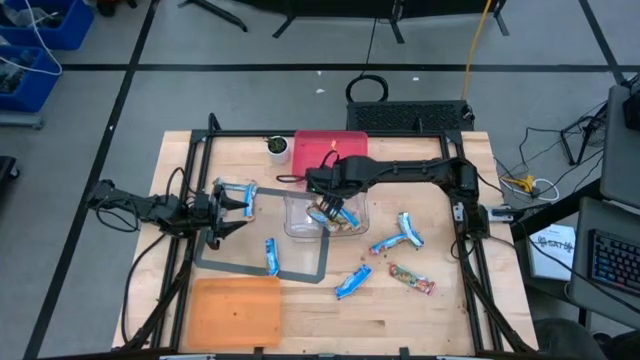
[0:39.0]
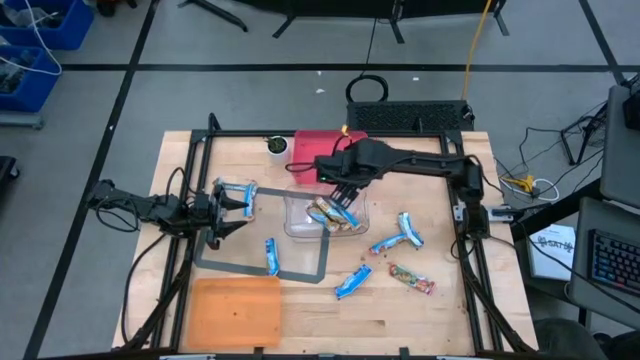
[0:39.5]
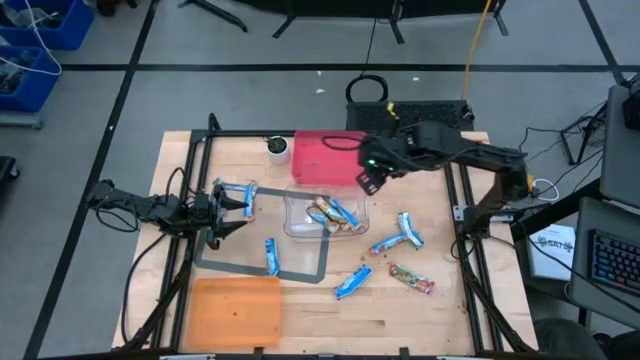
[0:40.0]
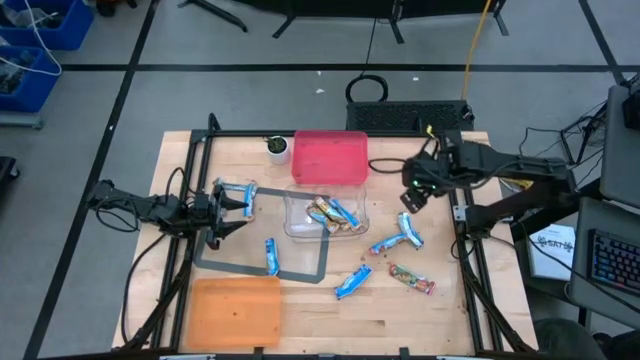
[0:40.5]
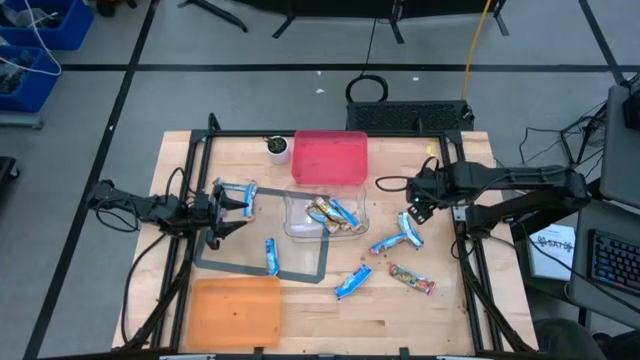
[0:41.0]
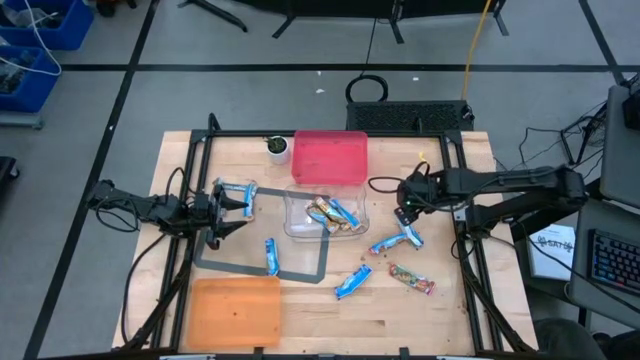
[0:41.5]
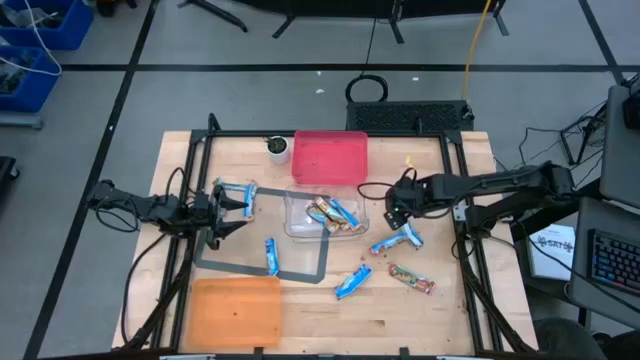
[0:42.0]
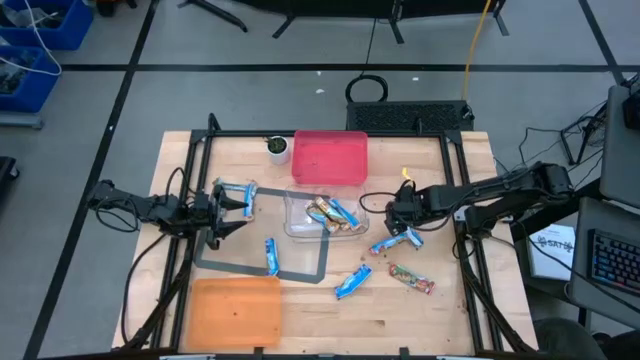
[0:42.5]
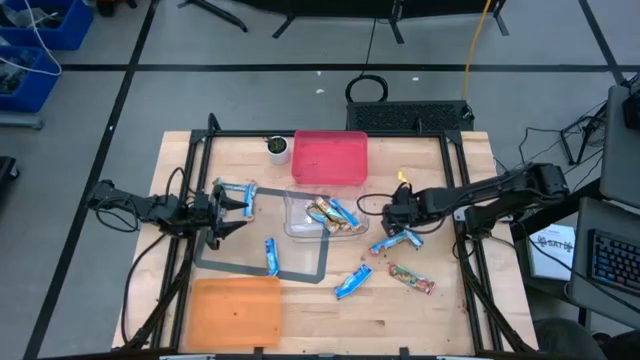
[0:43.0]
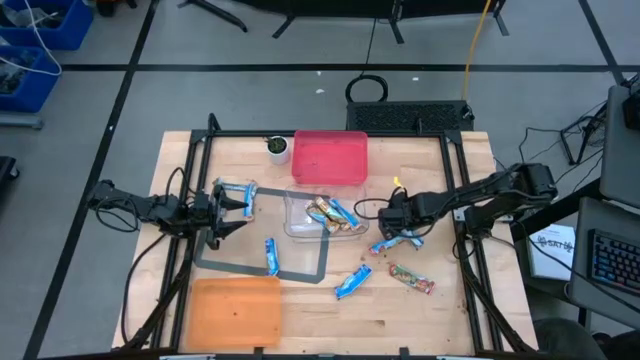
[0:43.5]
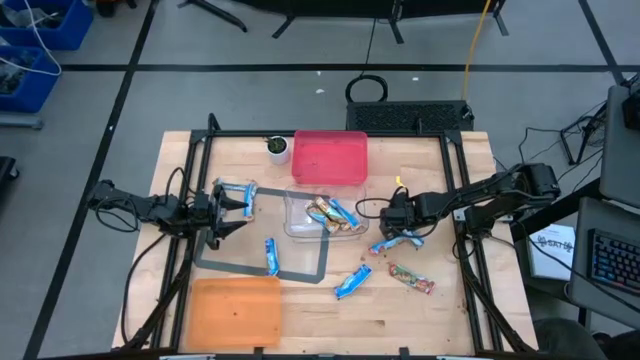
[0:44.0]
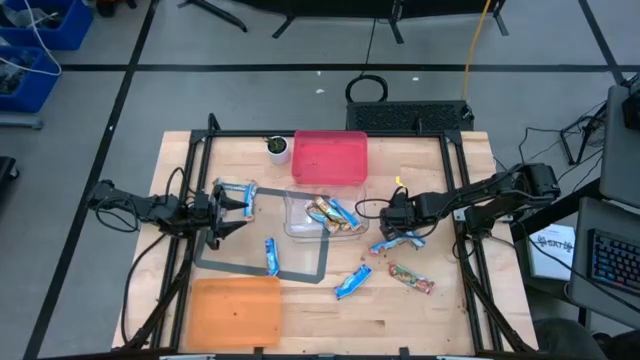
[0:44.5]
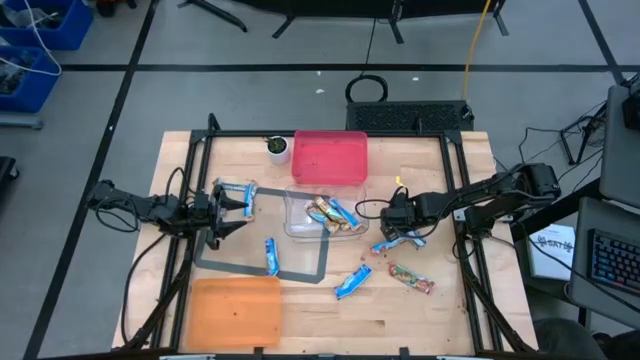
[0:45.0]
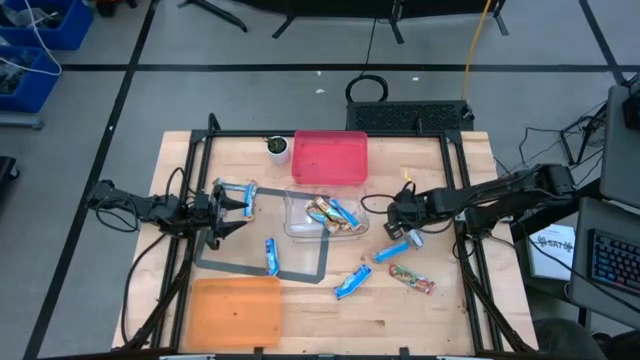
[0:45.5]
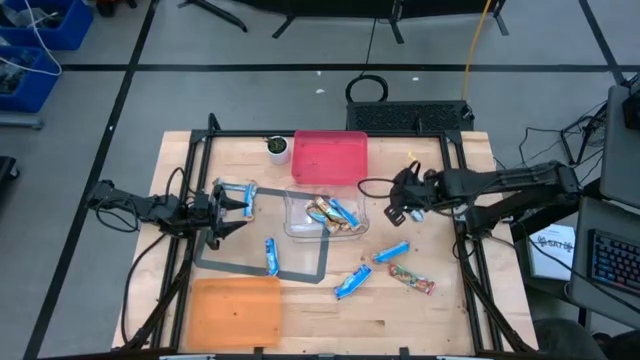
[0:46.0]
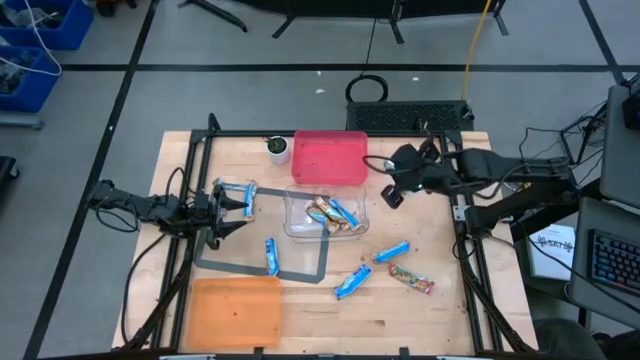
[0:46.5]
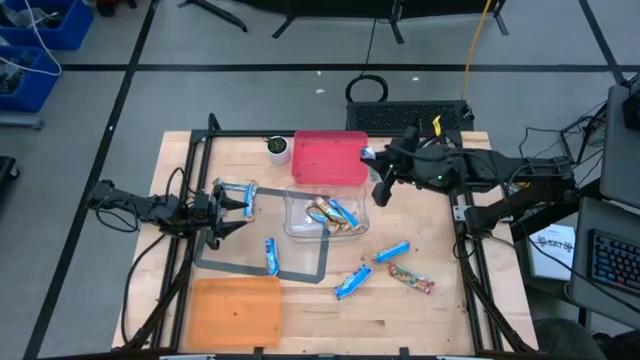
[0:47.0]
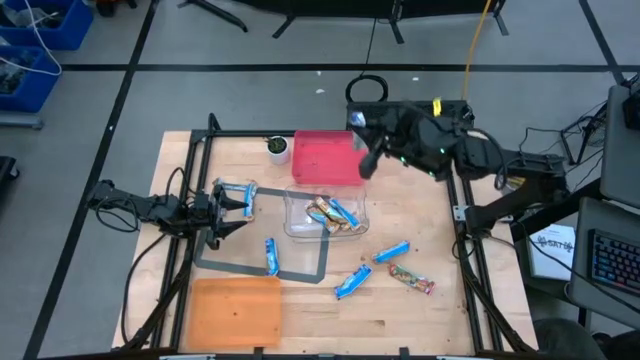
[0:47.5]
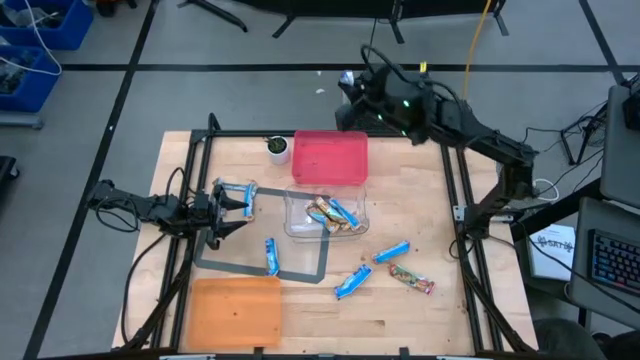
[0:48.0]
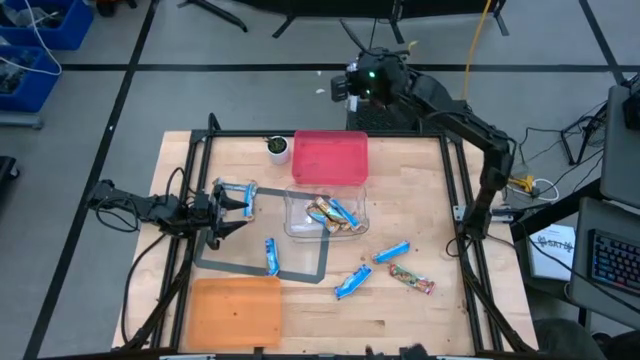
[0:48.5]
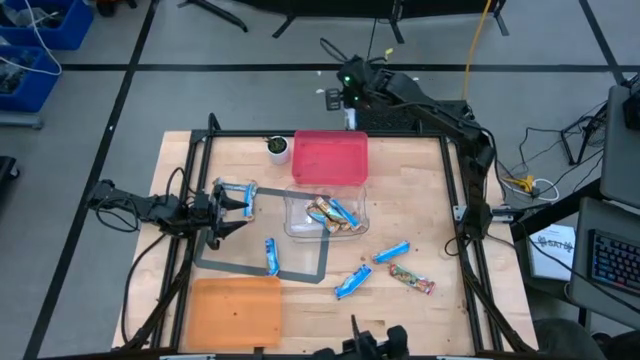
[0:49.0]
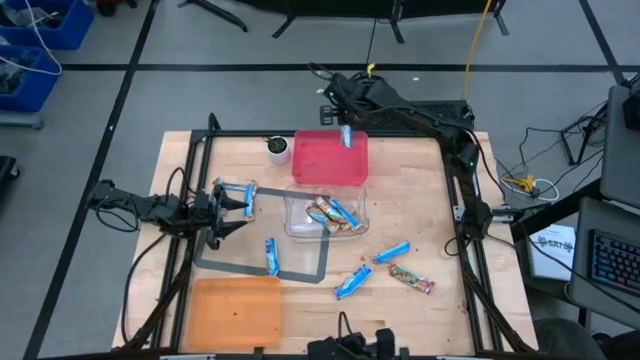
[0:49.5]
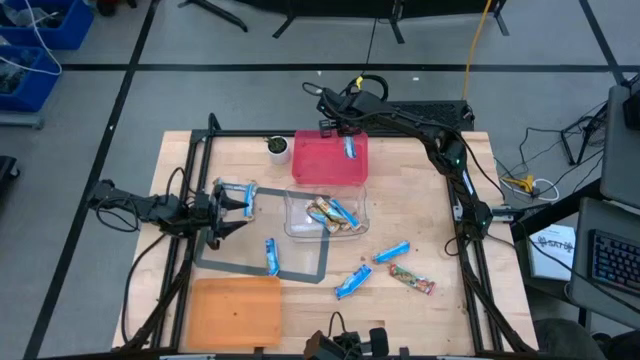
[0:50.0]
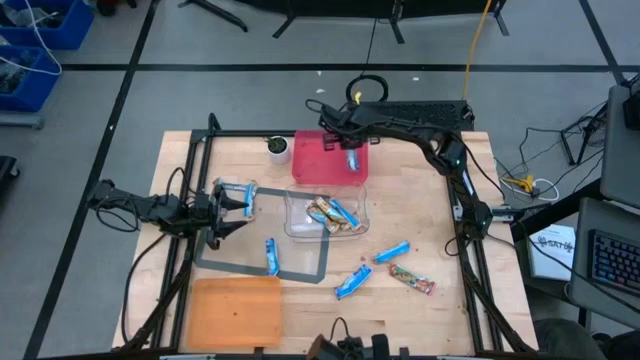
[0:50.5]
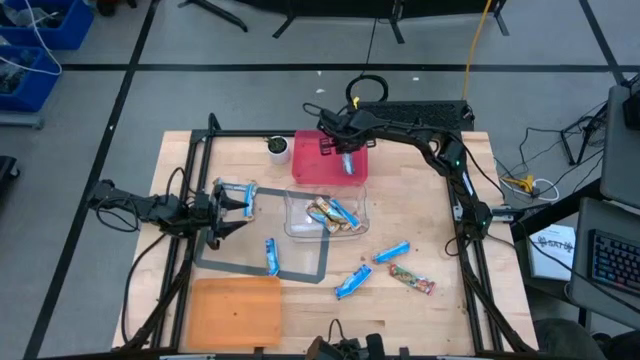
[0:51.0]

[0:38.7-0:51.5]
Task: Pick and place Granola Bars by type
Put the top right blue granola bar into the red bin

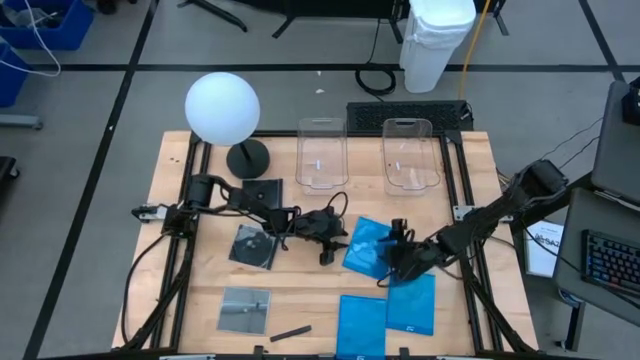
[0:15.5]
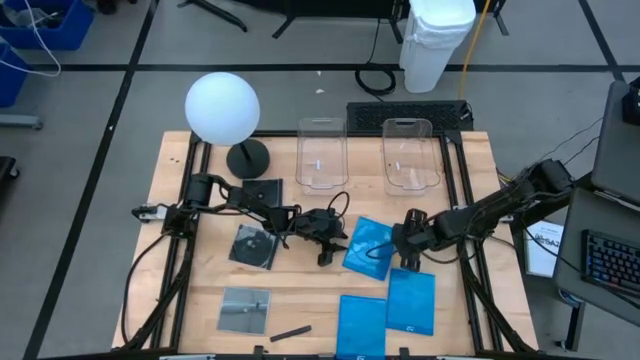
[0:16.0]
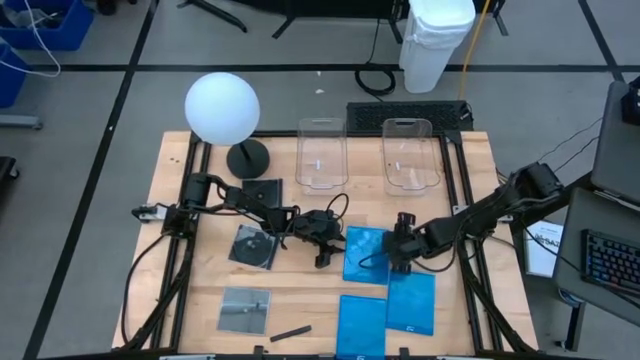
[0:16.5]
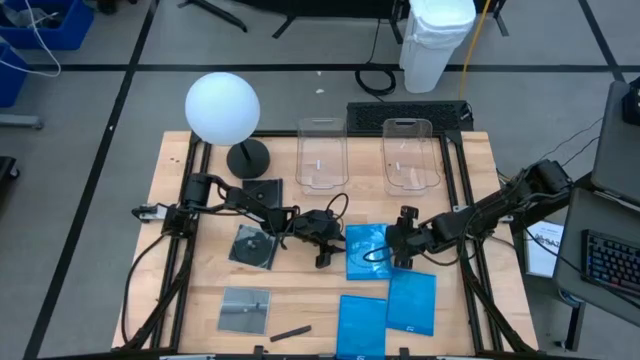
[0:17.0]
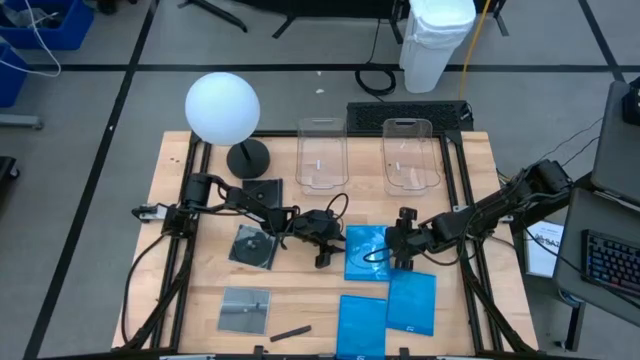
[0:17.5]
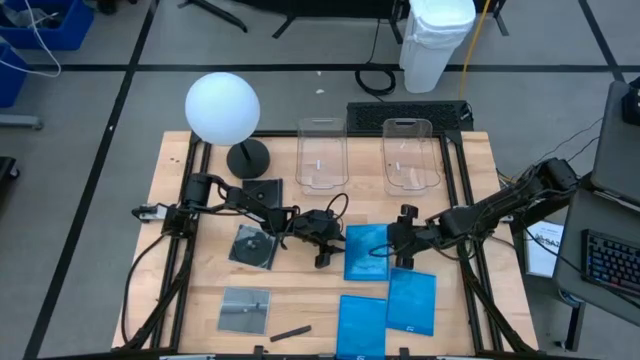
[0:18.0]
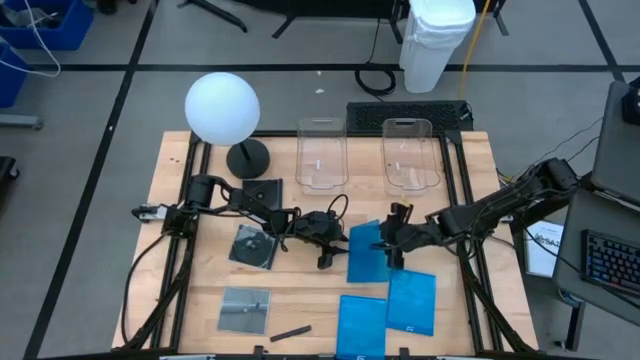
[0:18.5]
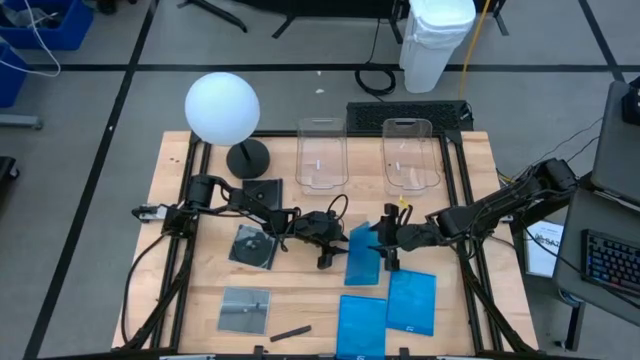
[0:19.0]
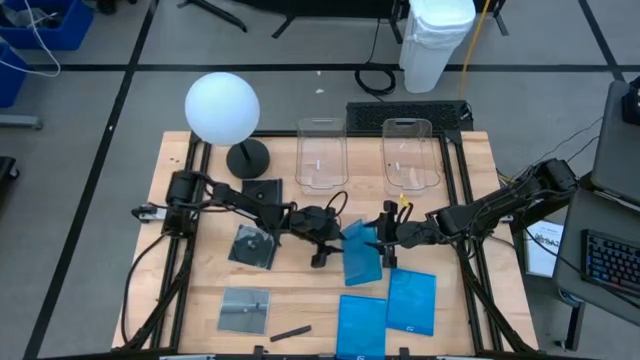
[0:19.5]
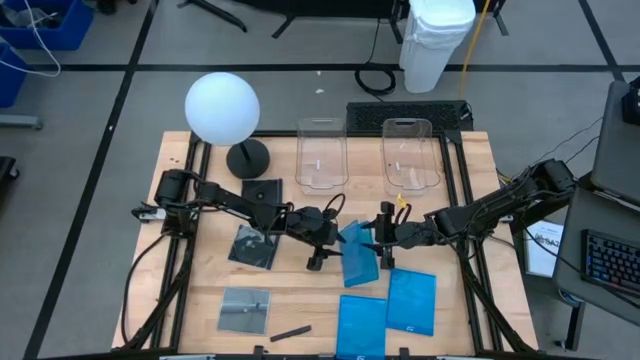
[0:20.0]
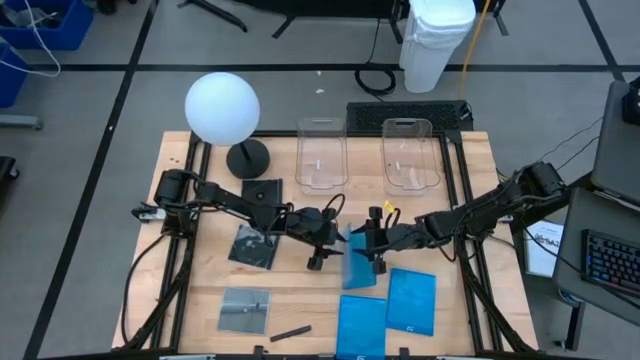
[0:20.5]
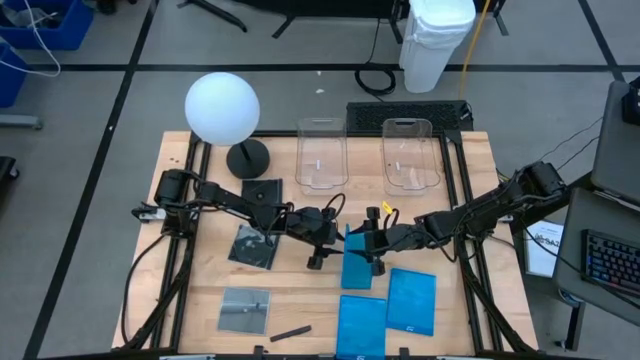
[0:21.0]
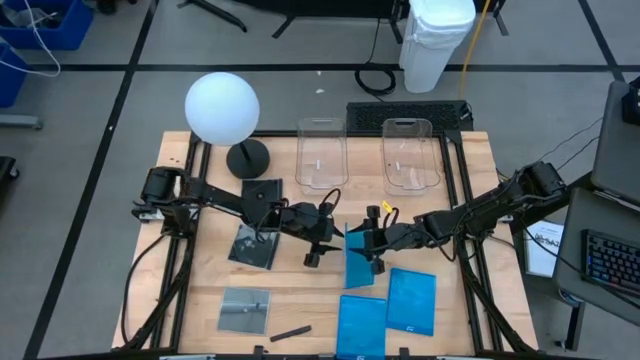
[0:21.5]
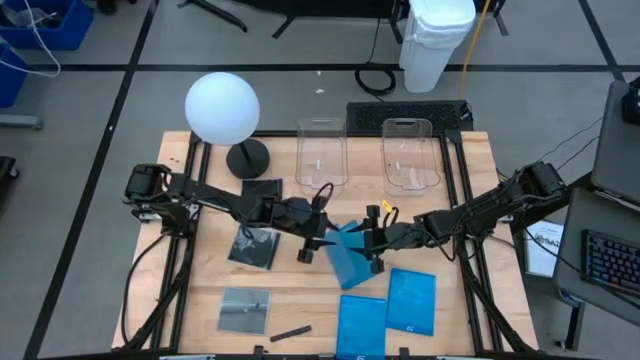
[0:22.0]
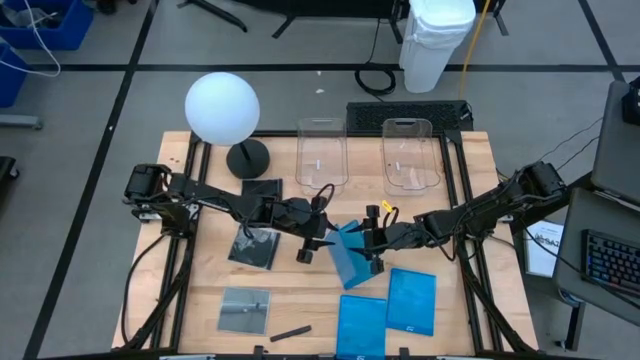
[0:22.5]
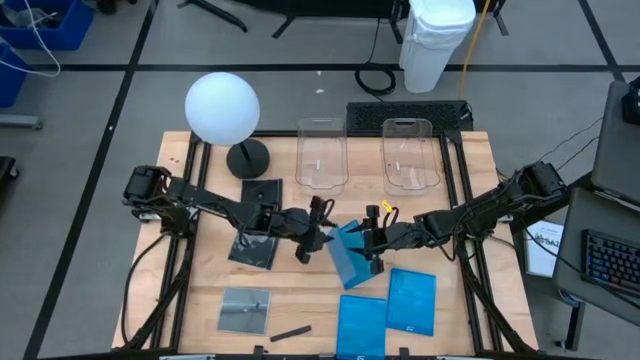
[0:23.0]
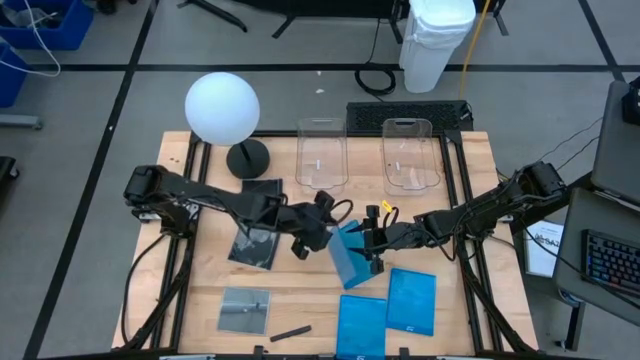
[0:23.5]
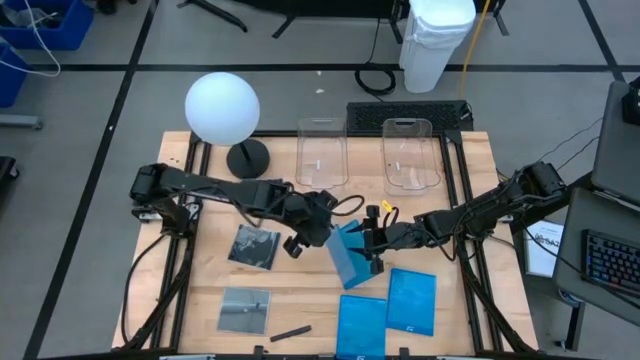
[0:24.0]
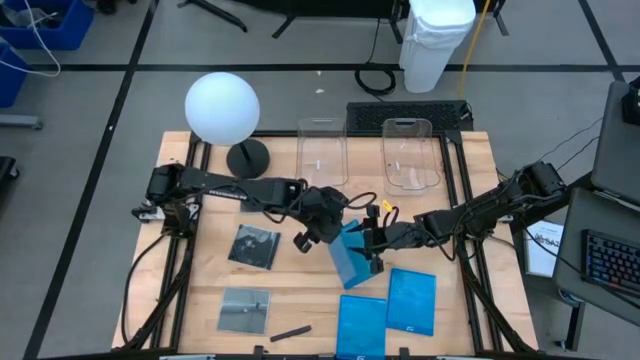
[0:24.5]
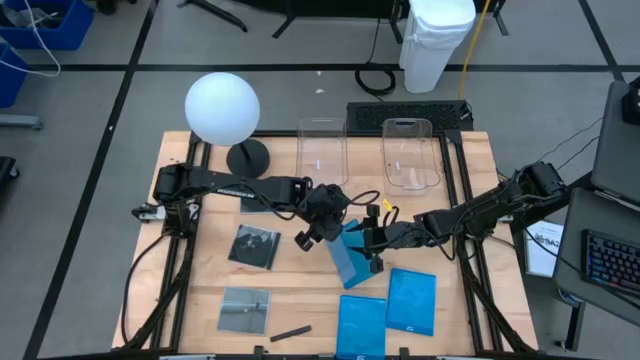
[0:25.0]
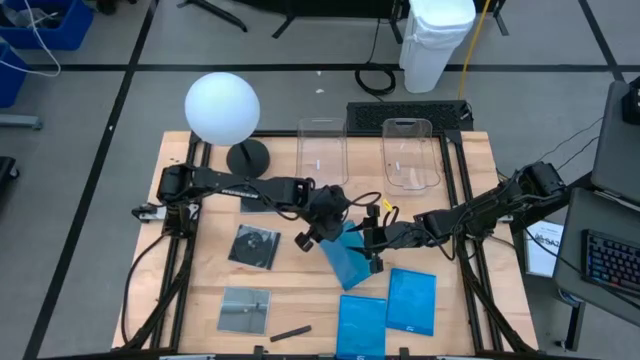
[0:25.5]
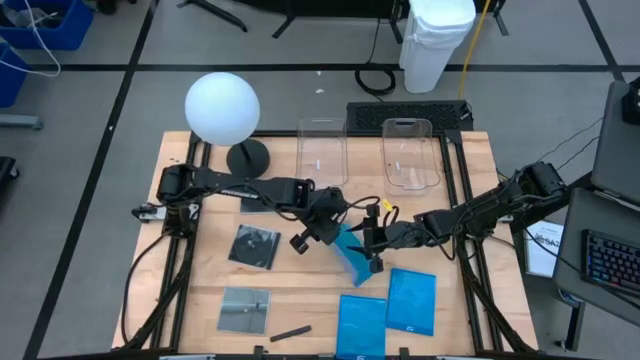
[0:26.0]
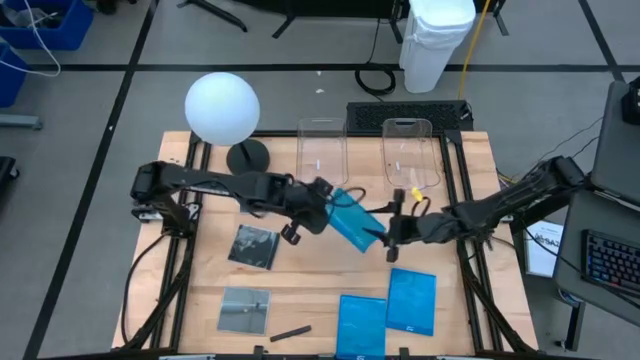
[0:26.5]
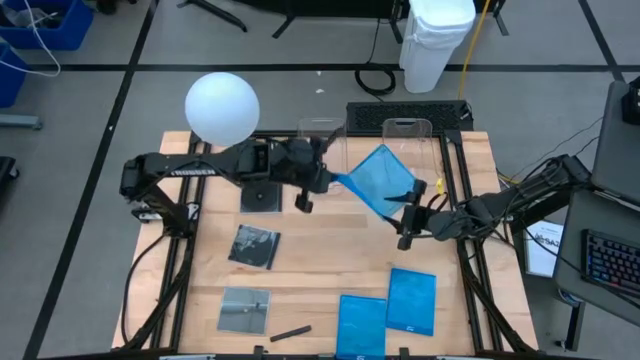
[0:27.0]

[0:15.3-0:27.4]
Task: Pick & place jewel cases by type
Put the top left blue CD case into the right transparent bin
